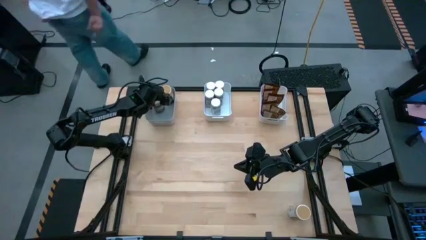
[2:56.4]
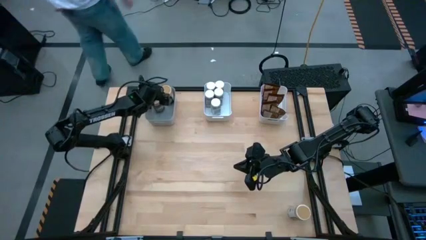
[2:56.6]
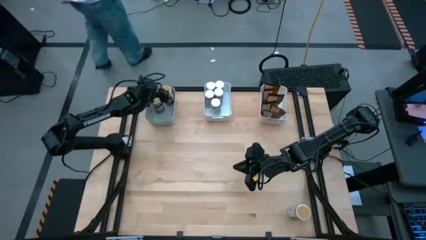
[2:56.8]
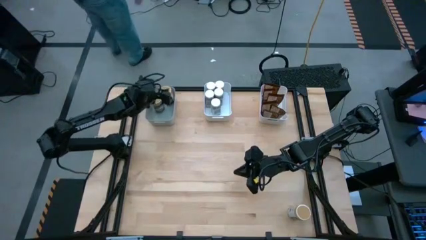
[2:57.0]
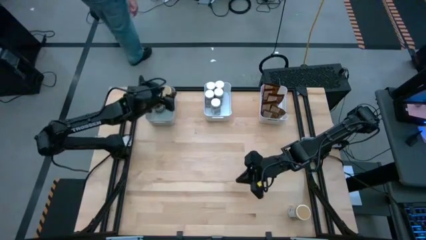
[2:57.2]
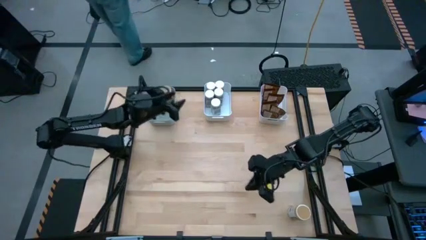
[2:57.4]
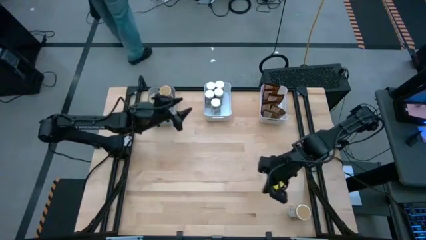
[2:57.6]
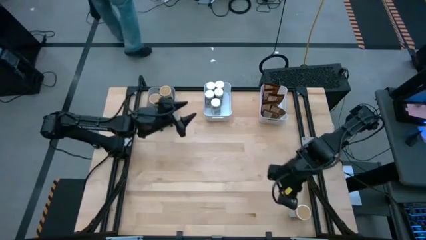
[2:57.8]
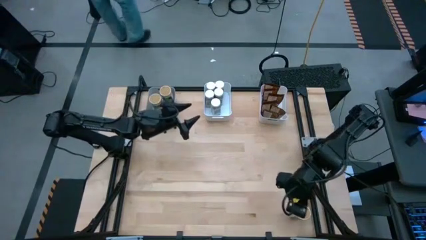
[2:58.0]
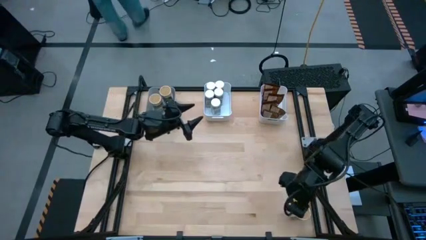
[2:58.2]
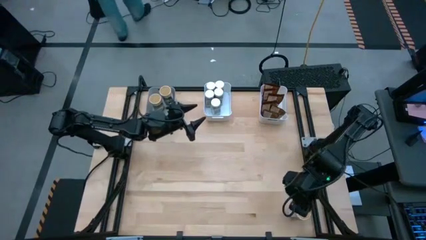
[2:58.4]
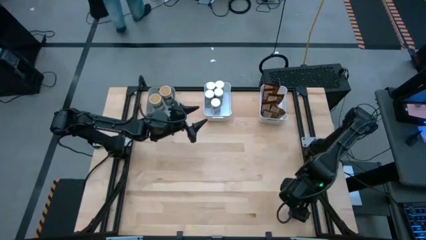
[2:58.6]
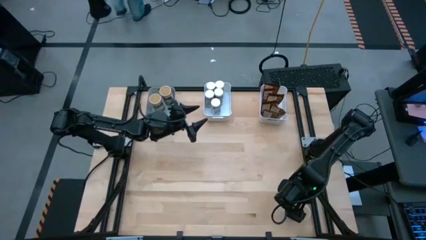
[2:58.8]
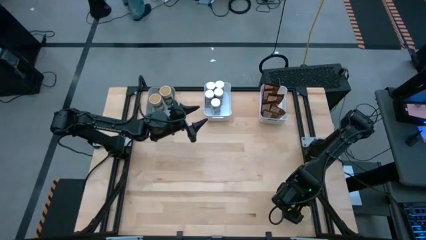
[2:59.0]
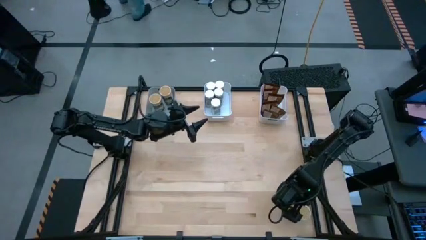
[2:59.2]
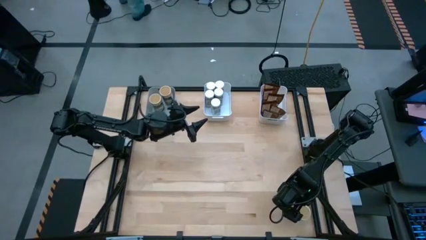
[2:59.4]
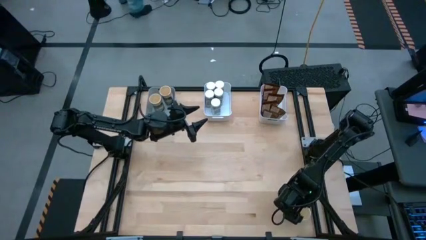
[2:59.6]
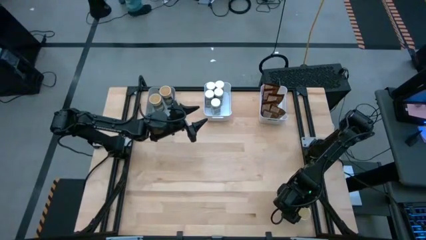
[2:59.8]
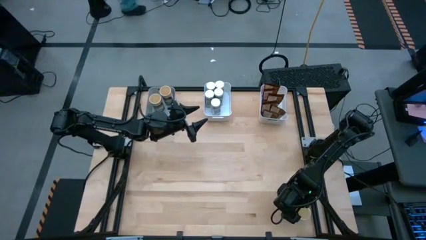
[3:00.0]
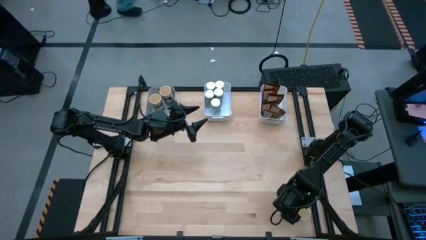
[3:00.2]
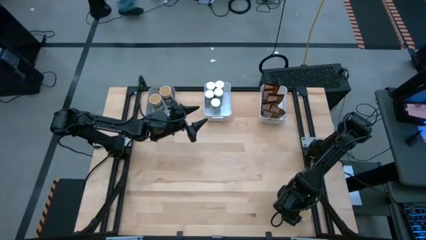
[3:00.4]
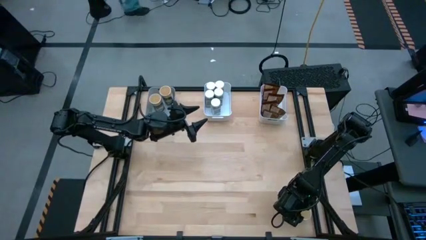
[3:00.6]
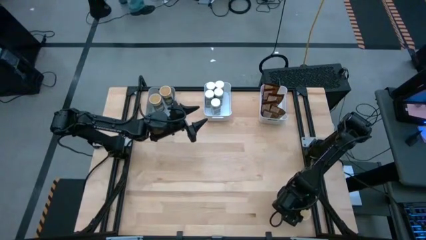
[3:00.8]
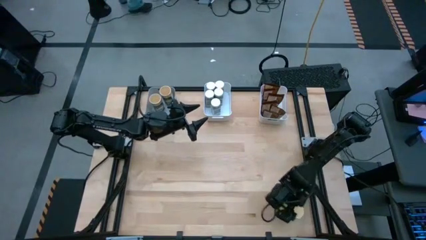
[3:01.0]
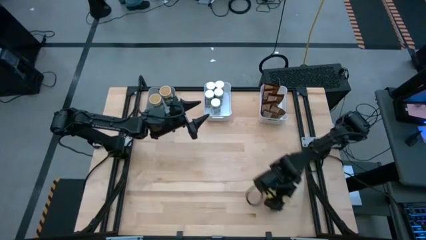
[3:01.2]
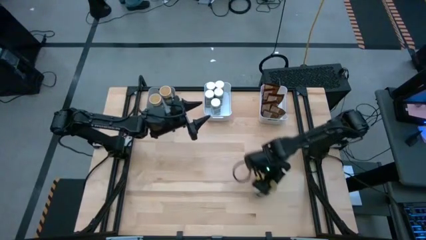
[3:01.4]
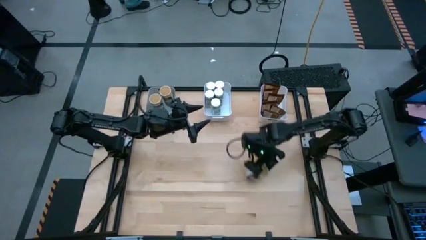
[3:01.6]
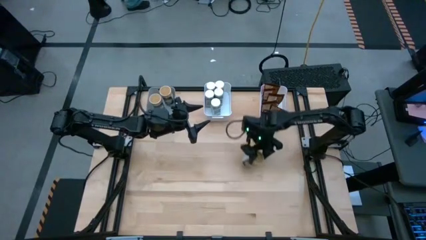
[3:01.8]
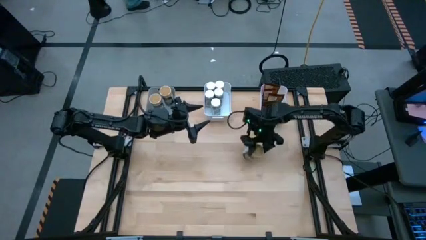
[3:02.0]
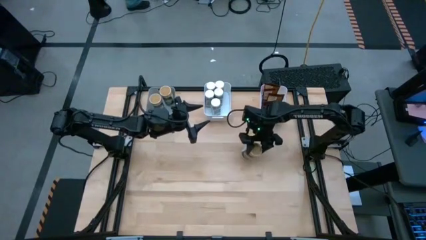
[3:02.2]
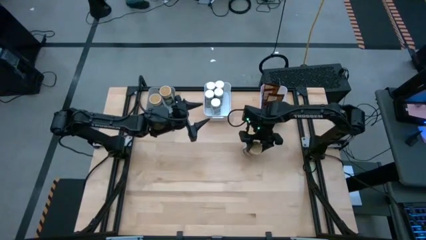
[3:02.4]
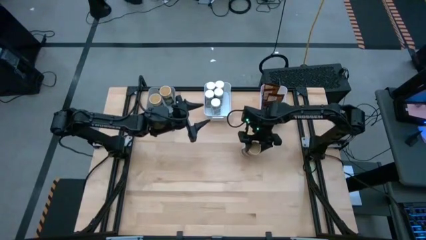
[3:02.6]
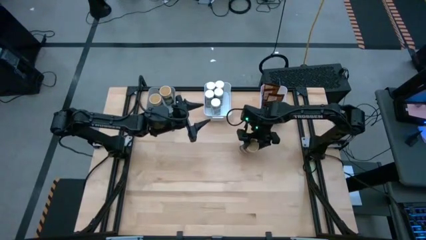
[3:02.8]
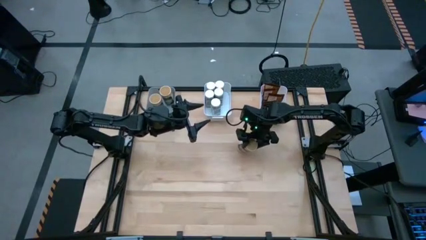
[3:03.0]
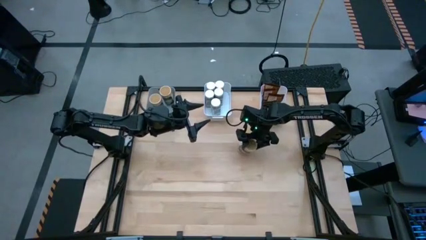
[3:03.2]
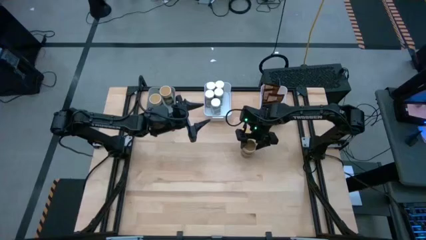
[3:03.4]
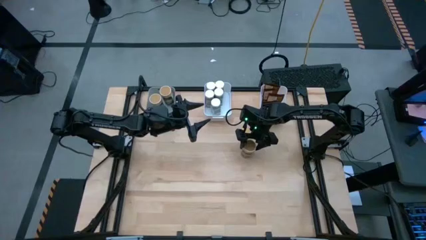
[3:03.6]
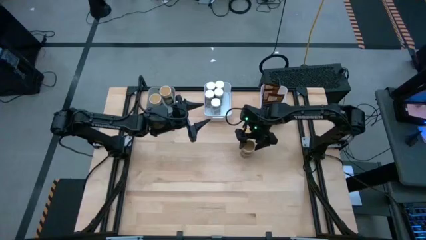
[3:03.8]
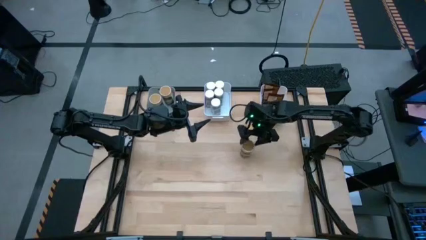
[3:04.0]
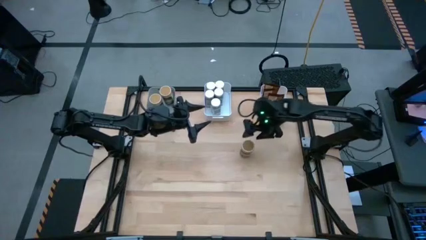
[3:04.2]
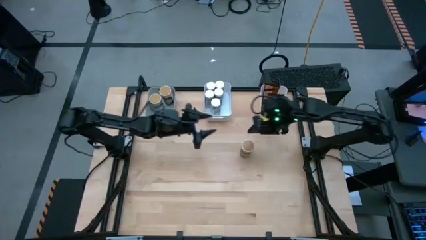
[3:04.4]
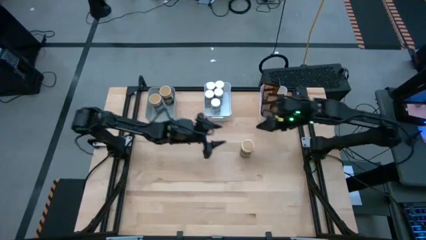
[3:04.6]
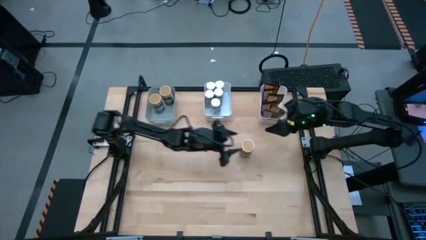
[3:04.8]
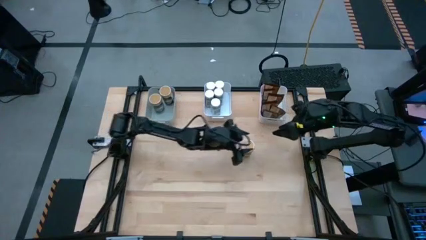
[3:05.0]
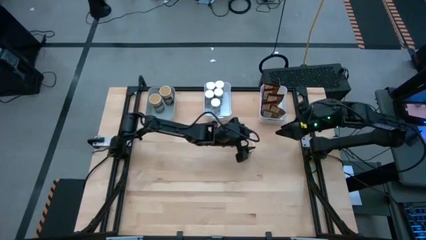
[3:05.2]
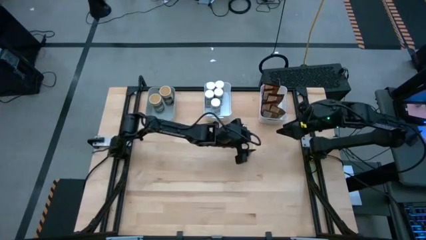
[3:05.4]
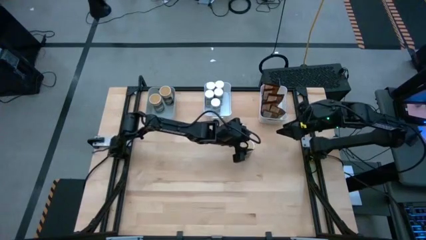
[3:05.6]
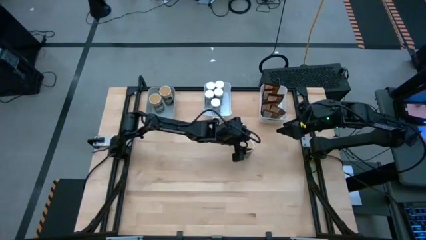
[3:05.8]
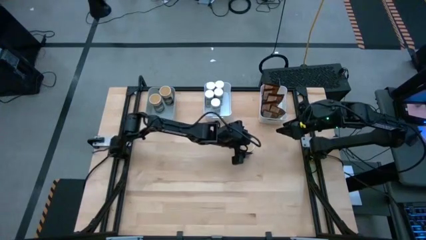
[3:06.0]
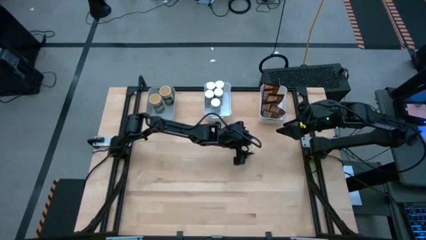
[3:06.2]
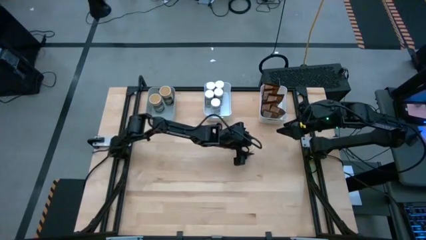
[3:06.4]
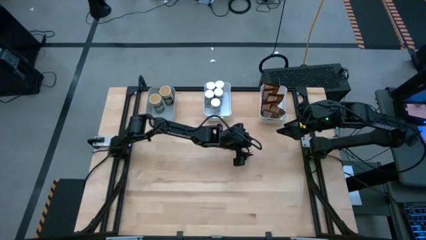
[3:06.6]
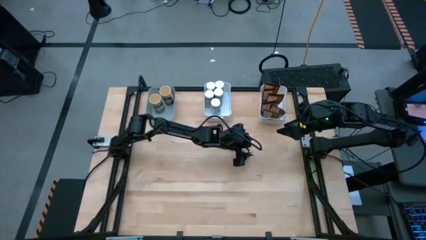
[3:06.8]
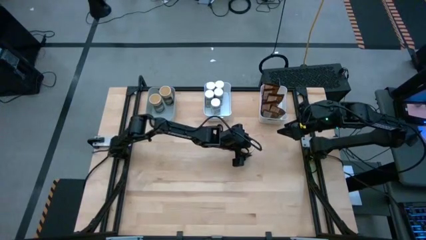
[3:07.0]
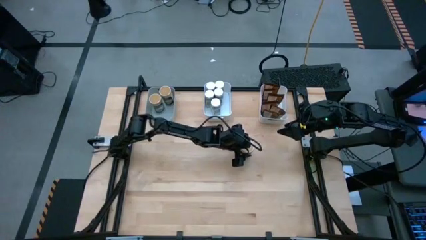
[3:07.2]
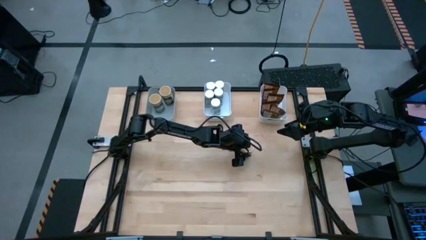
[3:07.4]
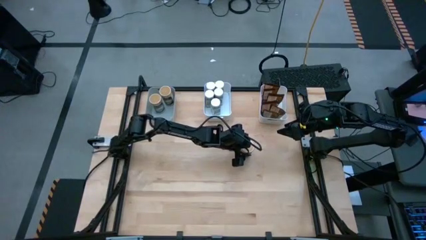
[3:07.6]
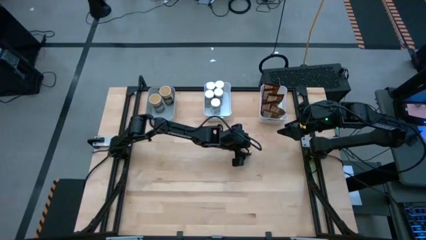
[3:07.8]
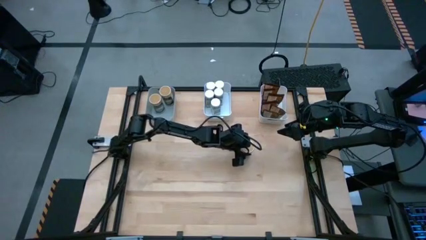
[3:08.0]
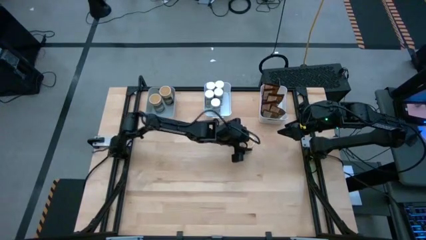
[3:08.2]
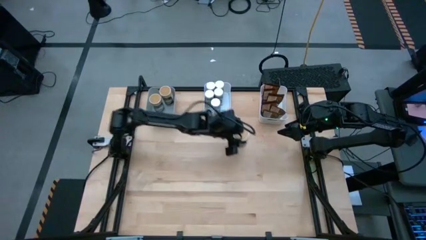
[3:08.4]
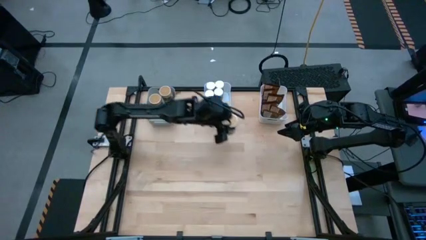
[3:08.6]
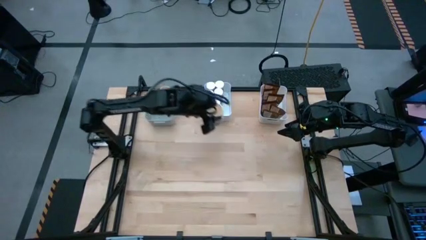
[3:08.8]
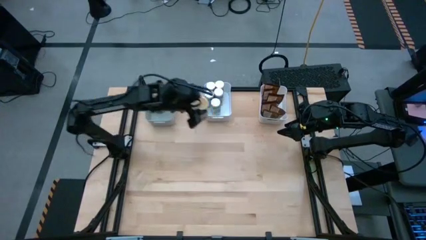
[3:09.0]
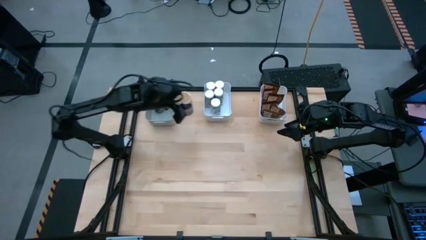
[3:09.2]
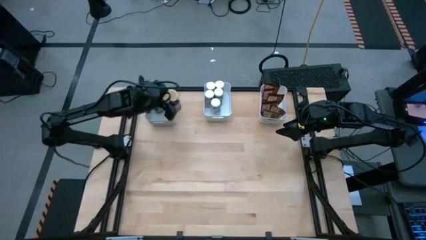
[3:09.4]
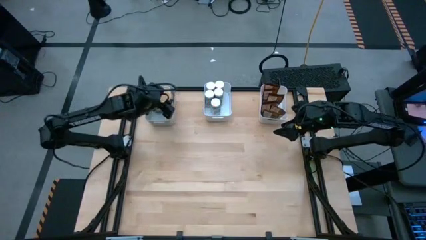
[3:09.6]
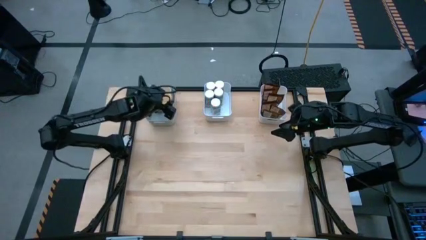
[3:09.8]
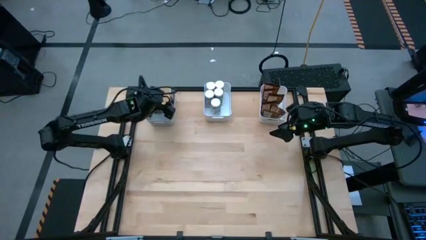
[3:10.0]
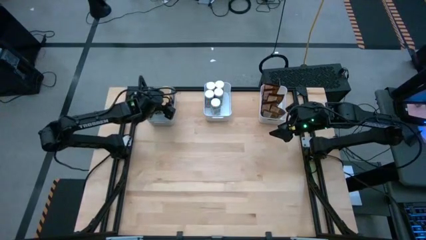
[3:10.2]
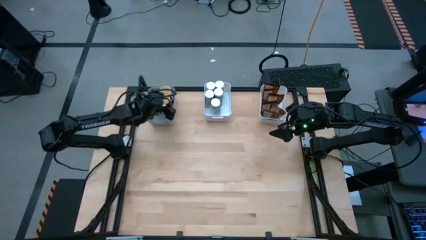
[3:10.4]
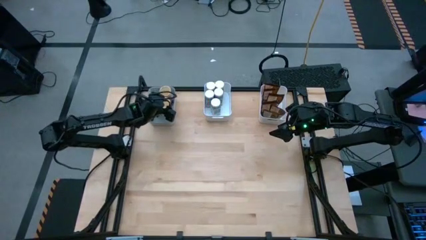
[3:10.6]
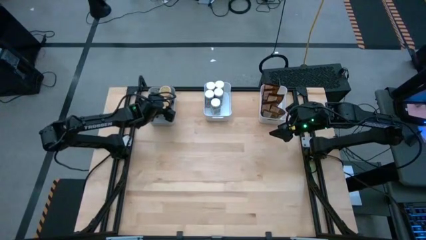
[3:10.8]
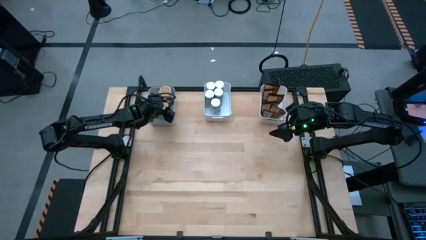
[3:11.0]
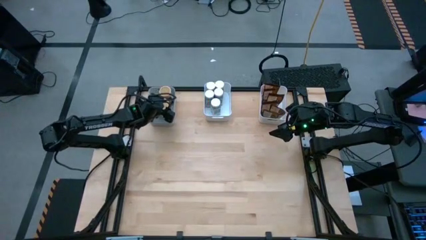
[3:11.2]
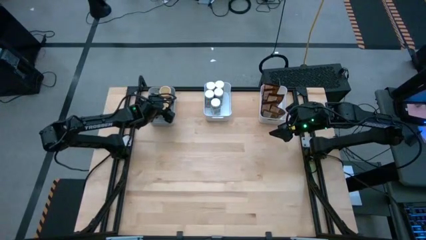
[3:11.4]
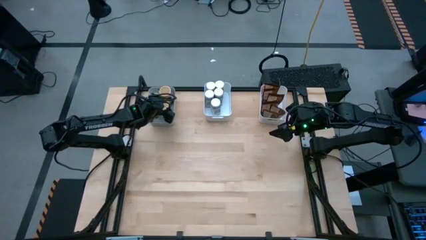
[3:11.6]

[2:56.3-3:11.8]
Task: Sort spices by type
Put the gold seasoning bottle into the gray bin

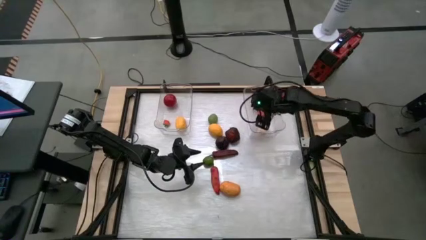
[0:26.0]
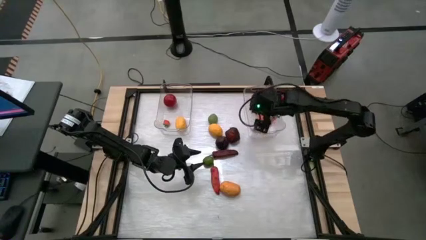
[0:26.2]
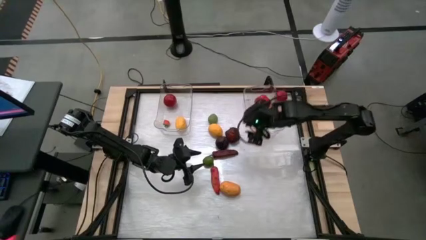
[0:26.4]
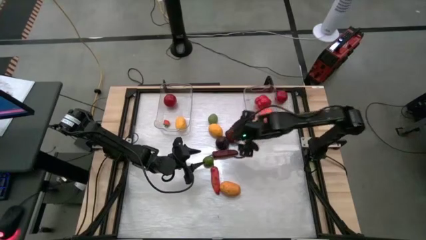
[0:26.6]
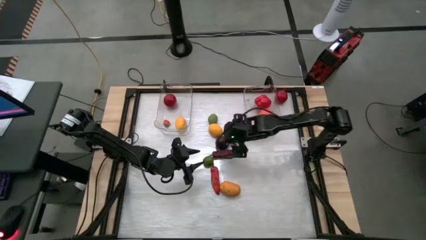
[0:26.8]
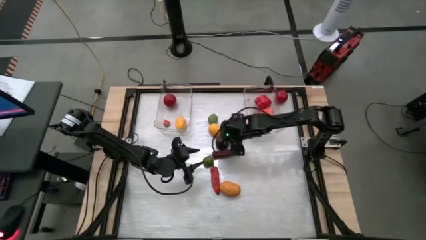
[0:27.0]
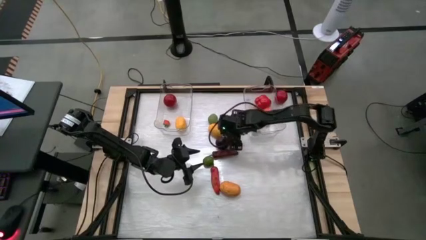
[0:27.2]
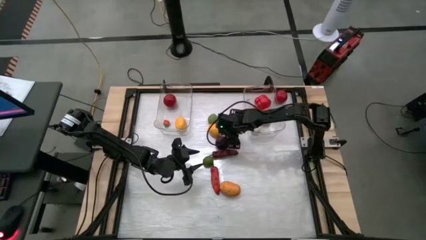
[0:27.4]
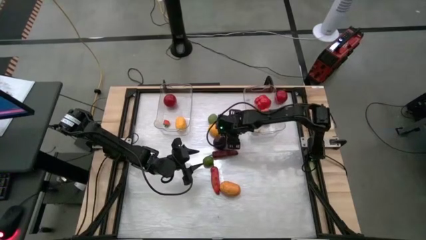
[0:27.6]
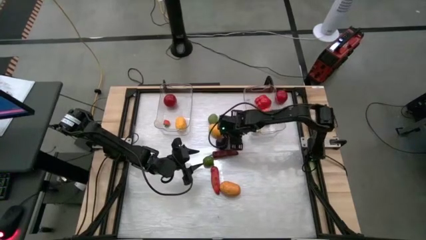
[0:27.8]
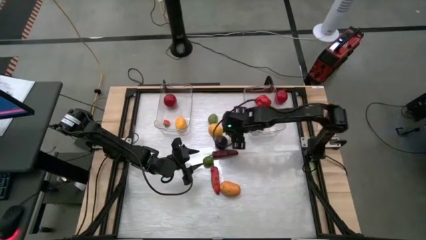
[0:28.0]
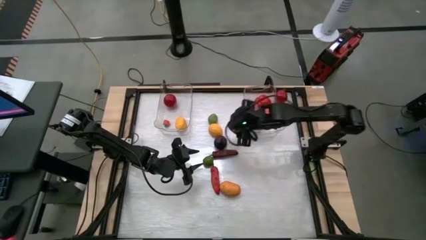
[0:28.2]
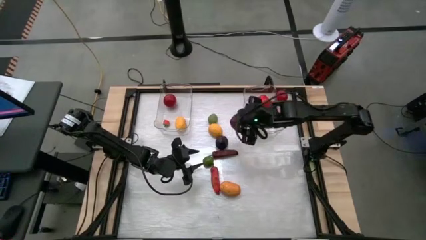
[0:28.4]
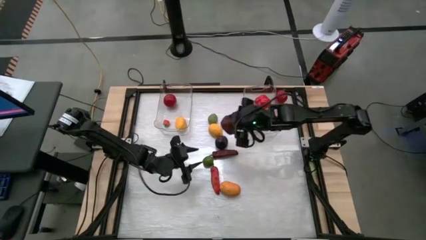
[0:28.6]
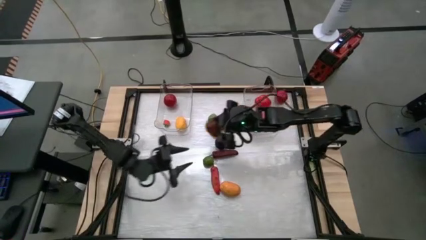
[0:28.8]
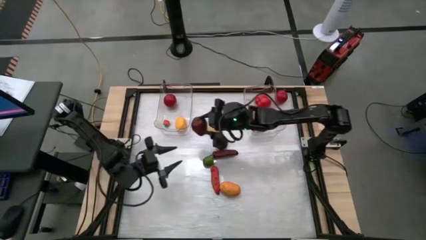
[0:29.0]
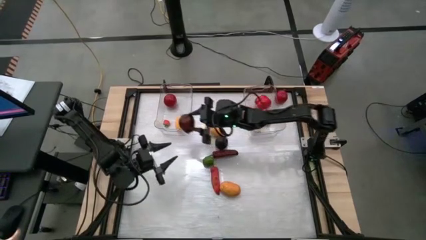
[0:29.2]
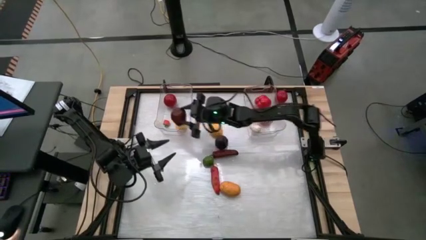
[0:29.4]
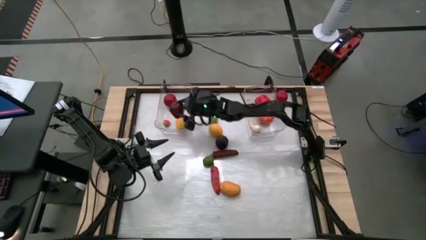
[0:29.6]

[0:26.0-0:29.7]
Task: Sort produce into baskets
Put the apple into the left transparent bin
